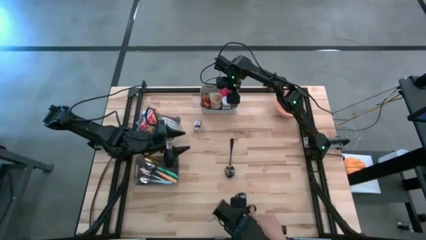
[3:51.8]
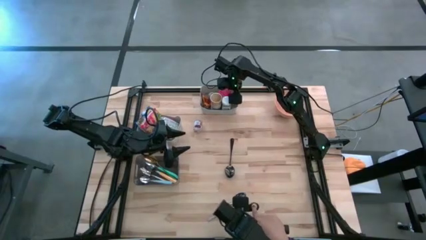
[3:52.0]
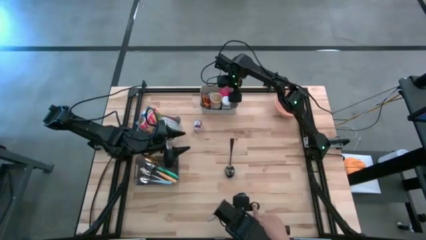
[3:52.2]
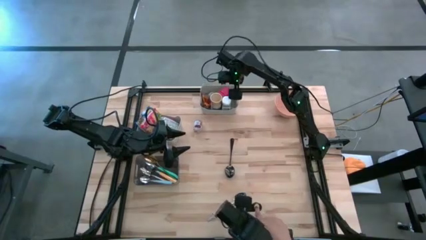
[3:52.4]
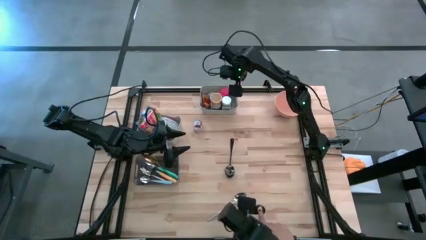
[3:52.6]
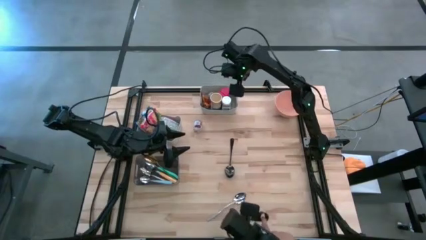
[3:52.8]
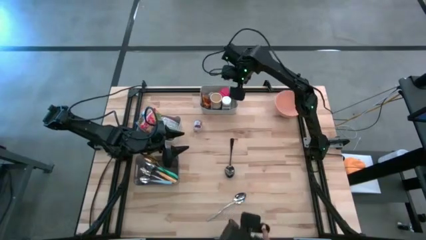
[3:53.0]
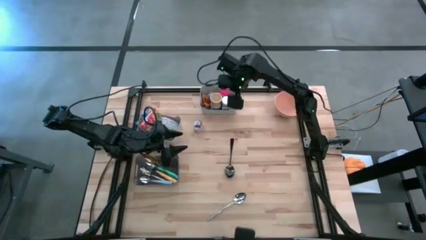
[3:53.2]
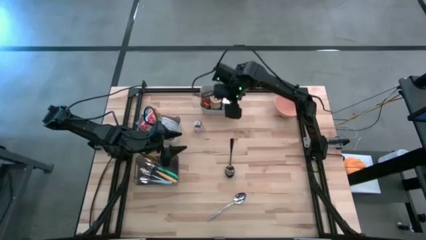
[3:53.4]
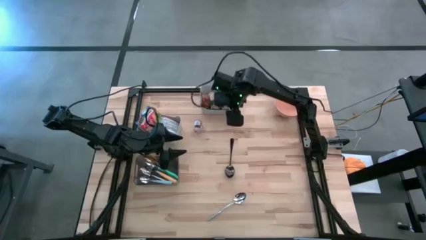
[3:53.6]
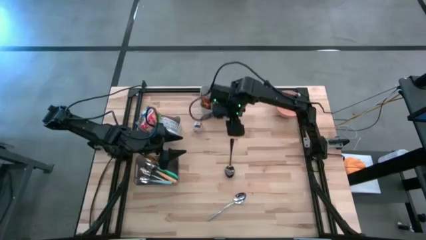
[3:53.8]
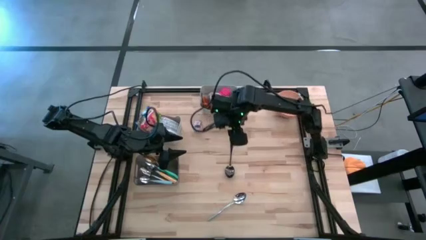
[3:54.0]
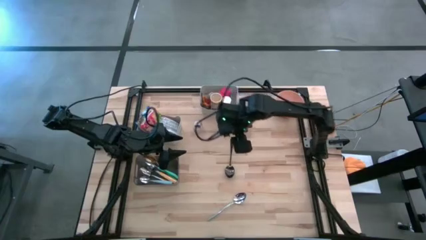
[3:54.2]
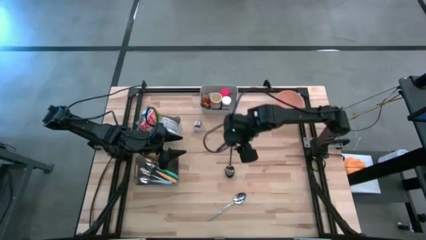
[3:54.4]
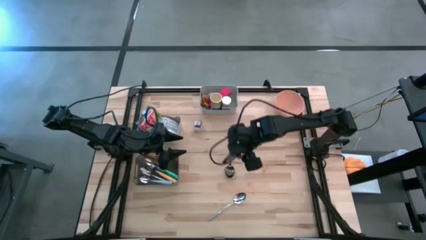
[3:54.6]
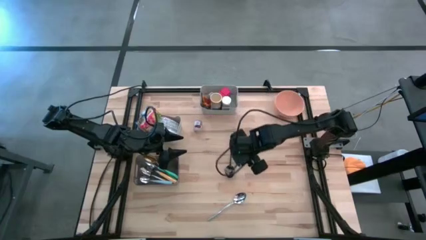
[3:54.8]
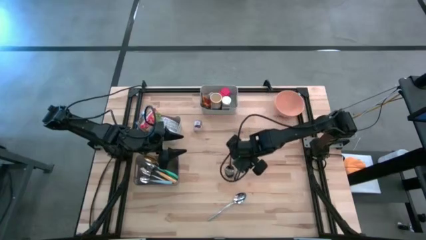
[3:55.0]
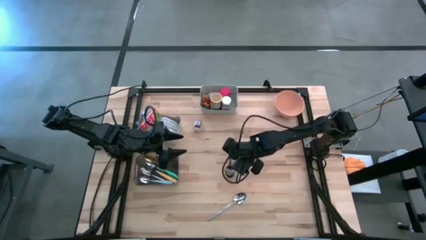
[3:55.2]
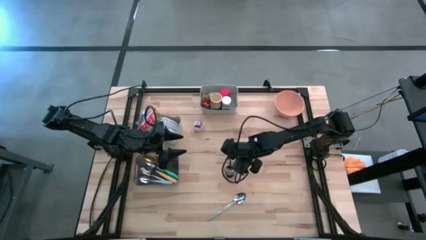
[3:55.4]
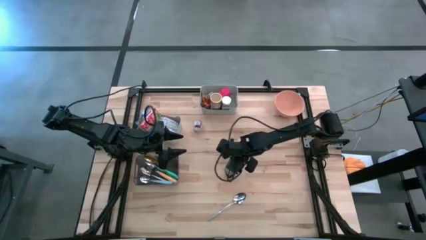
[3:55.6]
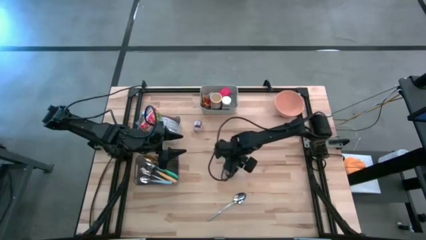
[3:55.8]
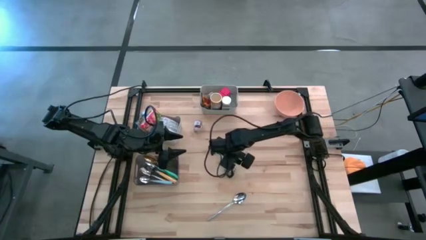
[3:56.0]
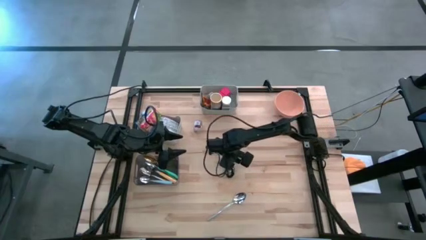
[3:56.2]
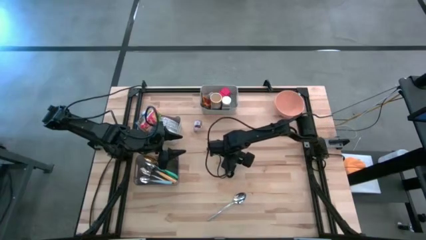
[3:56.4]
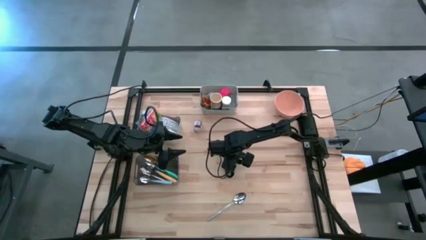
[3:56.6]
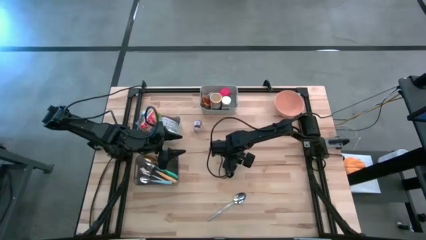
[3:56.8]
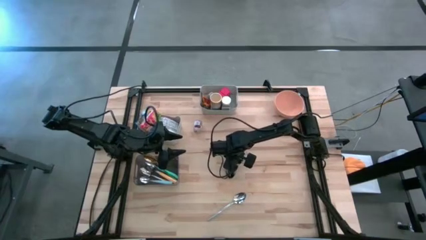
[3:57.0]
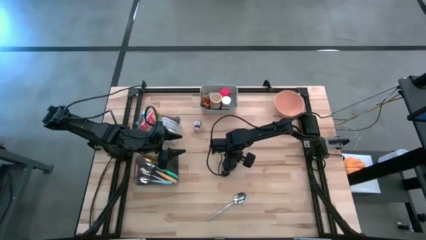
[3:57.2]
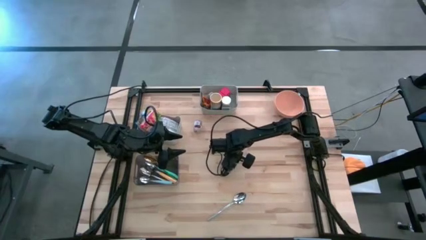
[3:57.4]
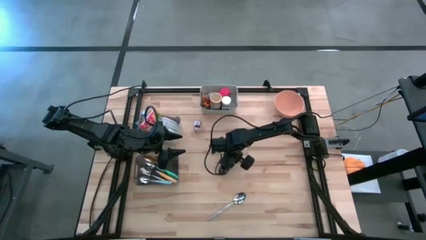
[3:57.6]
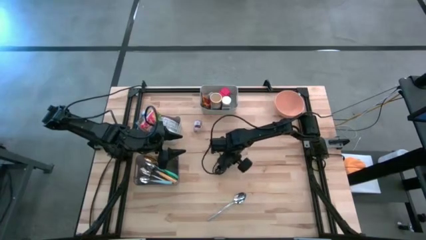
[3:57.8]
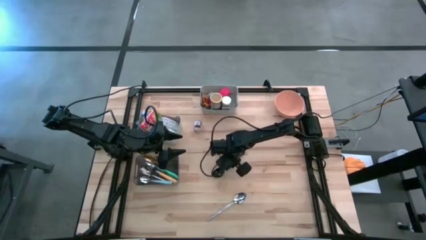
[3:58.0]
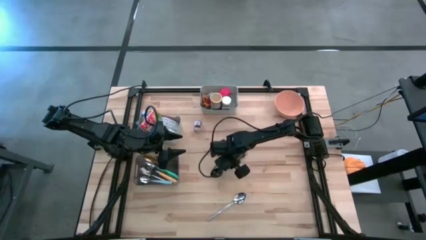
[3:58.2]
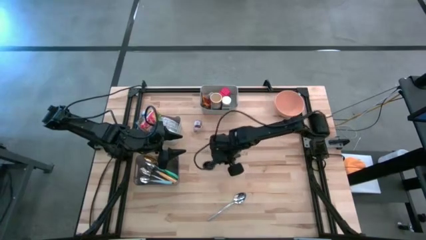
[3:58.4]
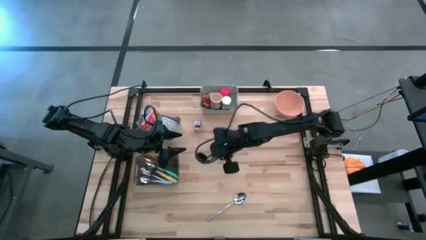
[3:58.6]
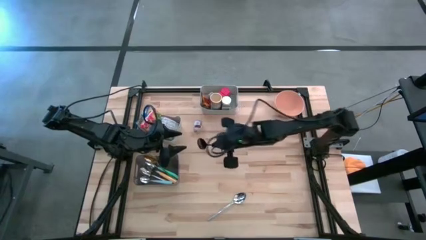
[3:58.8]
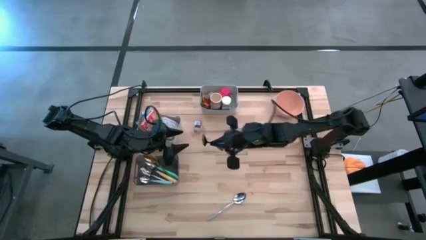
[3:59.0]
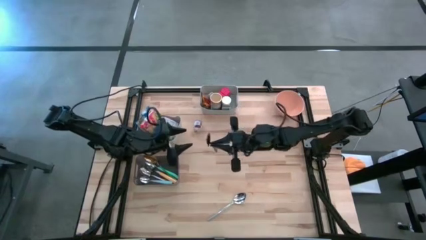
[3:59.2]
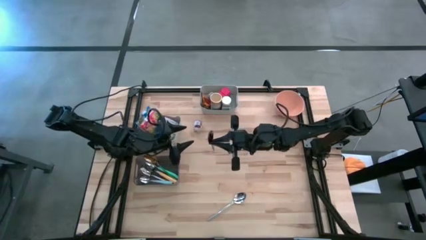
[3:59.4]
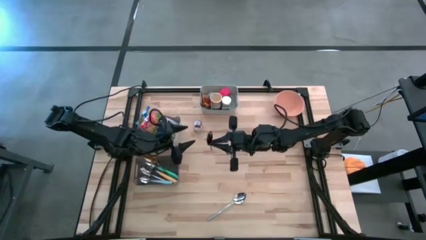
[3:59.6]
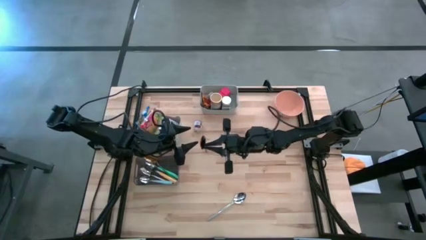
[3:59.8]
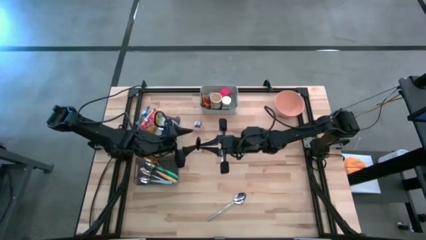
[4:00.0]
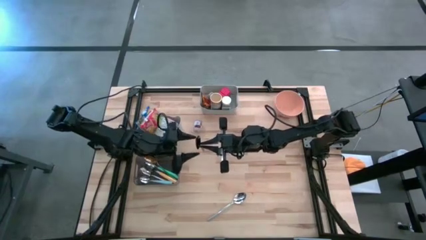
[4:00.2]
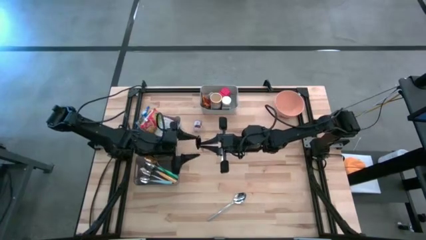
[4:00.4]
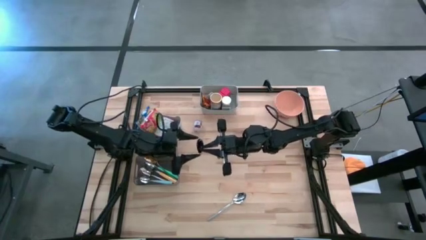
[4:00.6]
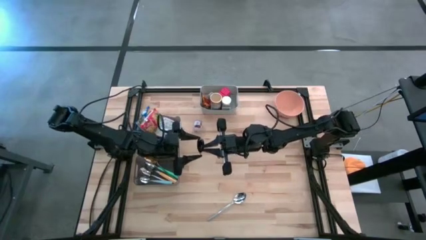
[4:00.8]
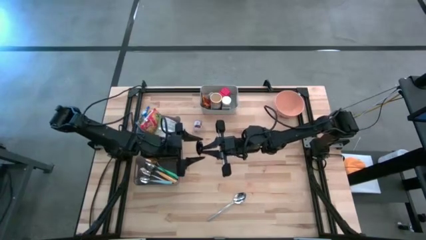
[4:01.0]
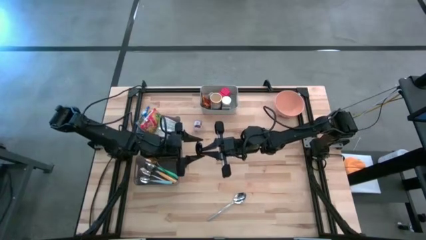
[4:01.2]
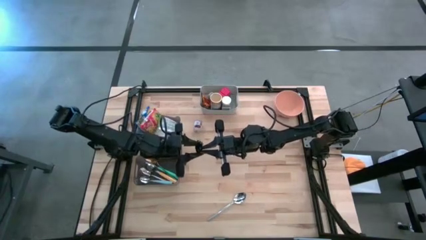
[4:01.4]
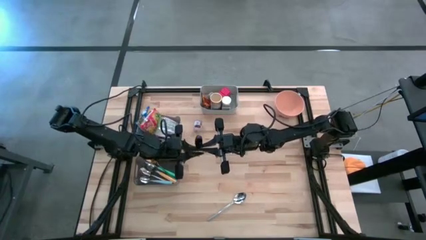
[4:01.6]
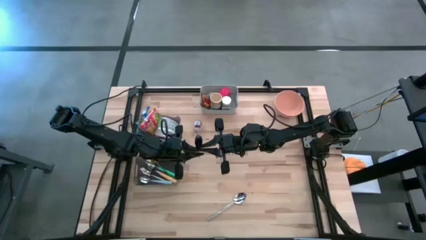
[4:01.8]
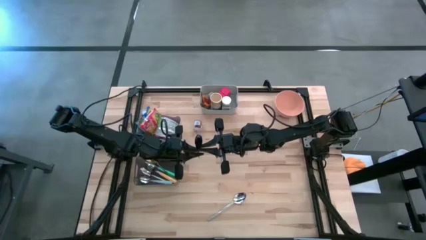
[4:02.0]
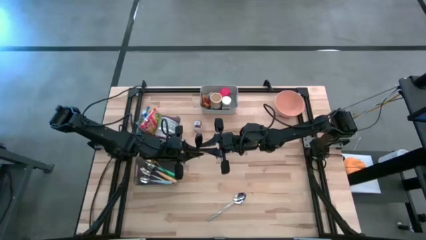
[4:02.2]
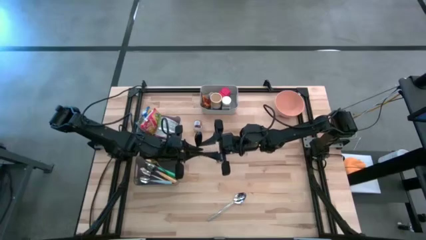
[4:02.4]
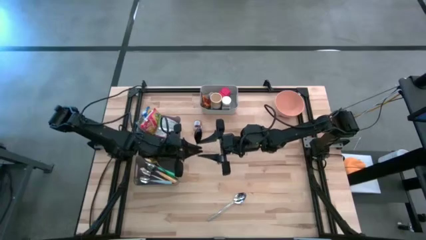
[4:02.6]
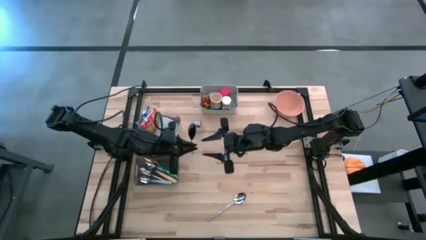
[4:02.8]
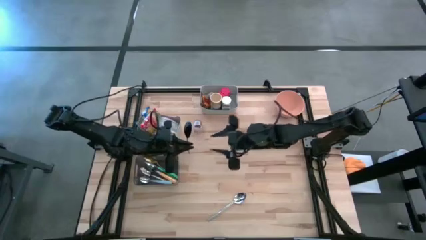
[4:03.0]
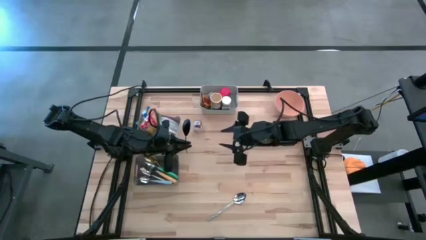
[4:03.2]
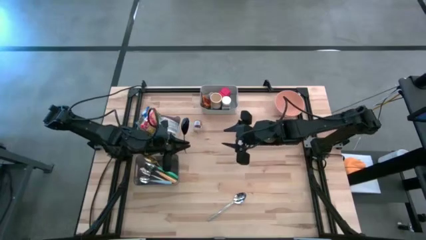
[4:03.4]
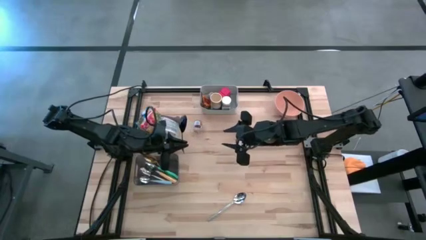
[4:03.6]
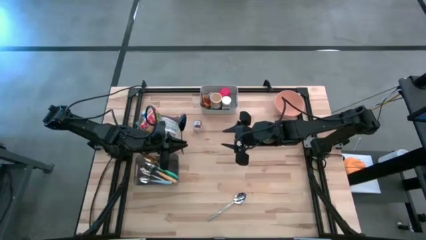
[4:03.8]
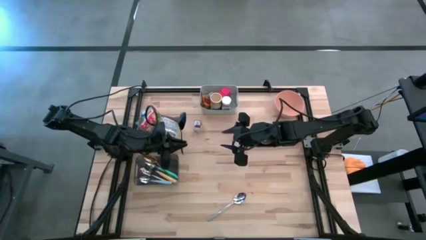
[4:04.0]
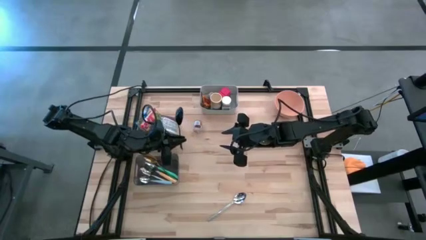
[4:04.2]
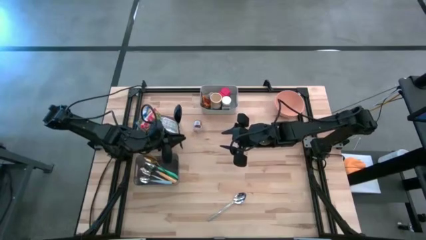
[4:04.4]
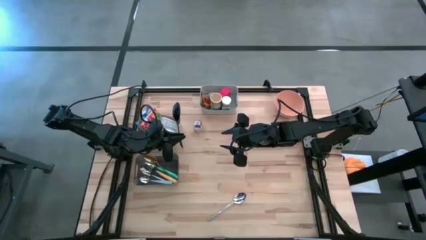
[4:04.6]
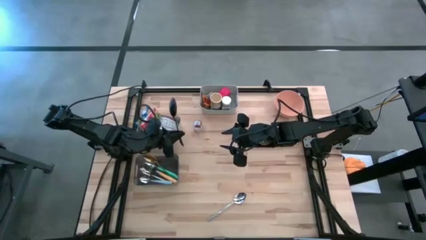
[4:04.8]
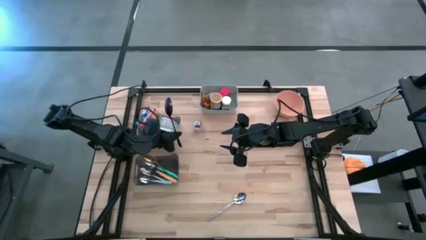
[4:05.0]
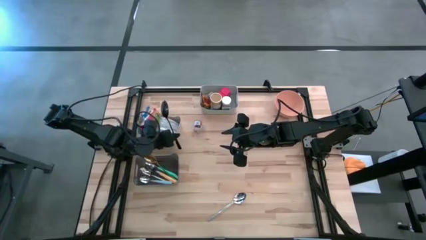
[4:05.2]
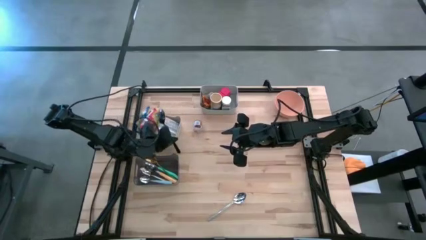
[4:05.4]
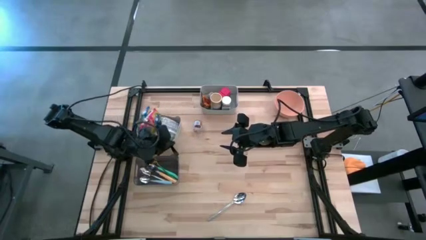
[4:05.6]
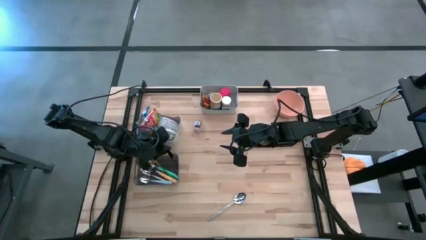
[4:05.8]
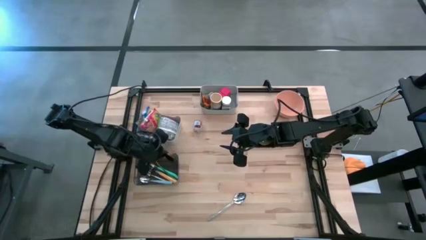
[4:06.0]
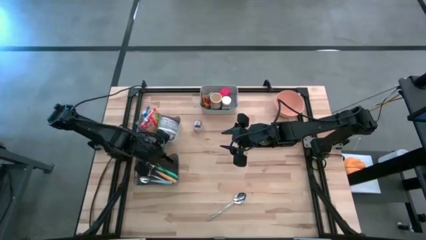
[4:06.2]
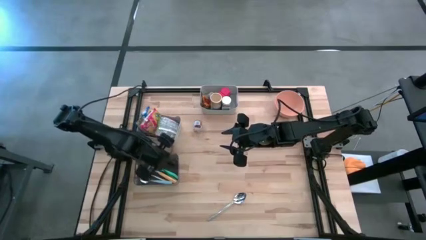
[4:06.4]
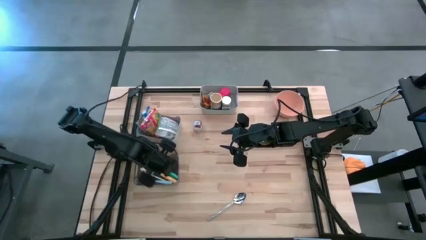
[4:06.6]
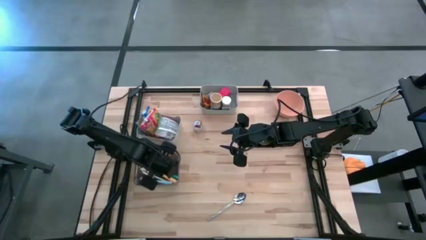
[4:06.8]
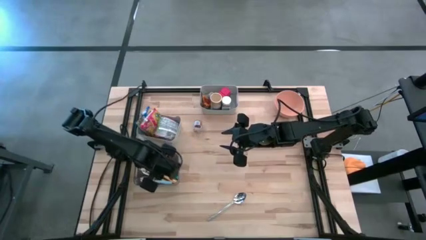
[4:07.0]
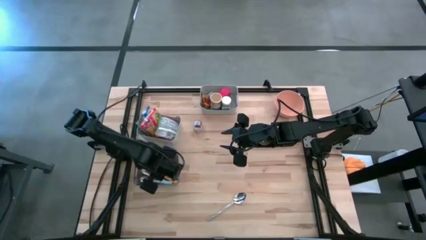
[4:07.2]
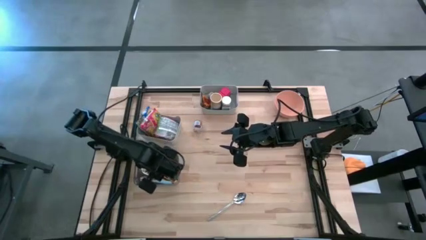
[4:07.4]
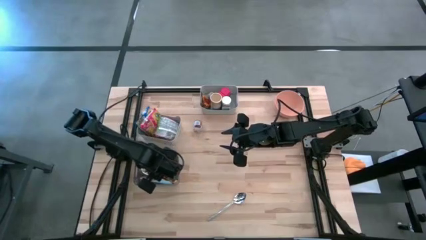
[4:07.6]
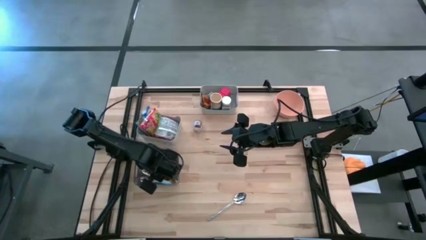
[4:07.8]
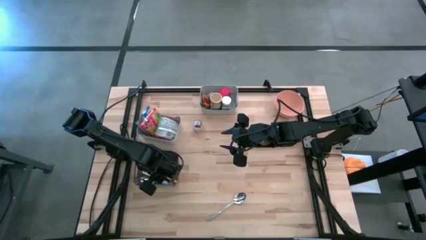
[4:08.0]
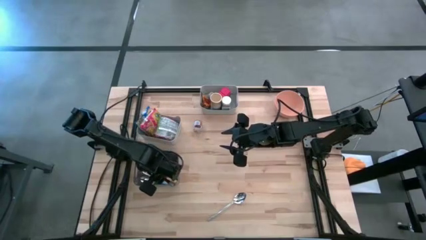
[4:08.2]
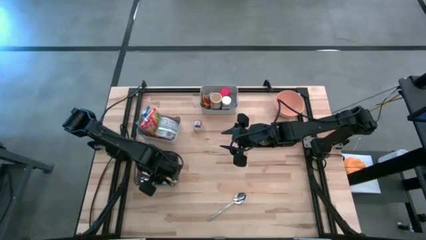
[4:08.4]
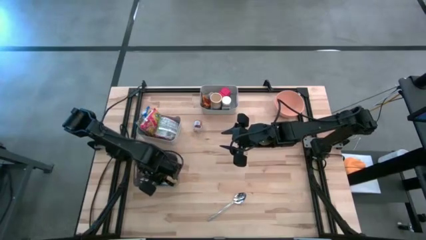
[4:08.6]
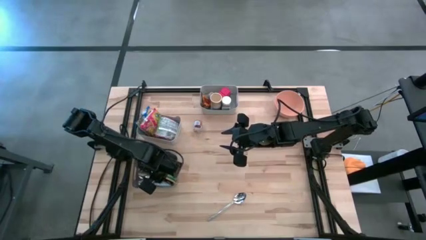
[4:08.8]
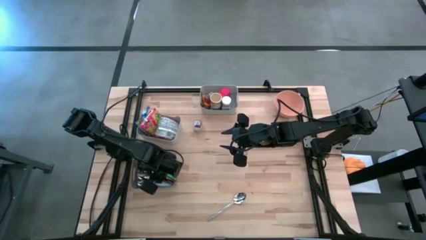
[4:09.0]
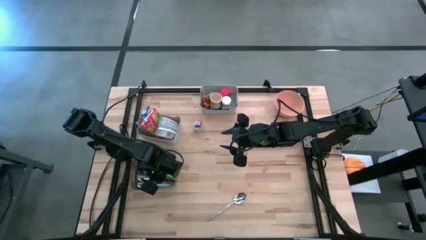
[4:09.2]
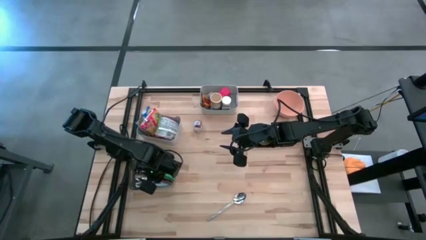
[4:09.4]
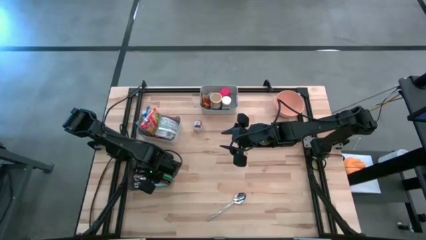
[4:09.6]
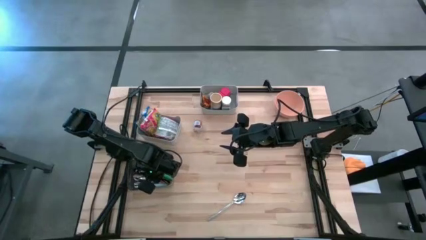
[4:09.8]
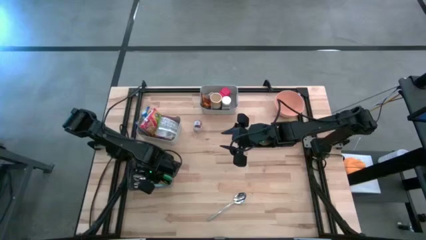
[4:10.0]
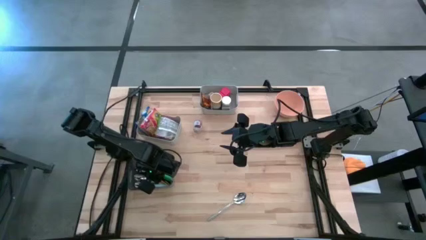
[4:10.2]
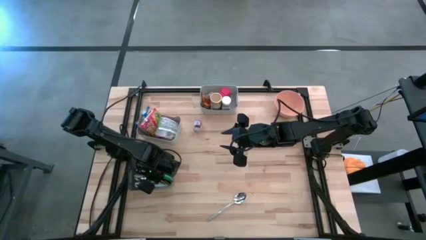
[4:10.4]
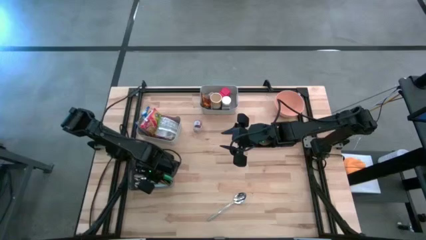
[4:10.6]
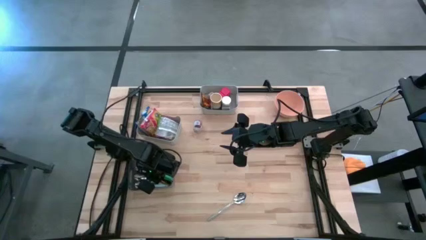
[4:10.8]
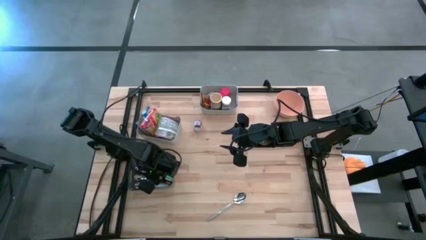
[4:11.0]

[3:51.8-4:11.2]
Put the black spoon into the black bin
